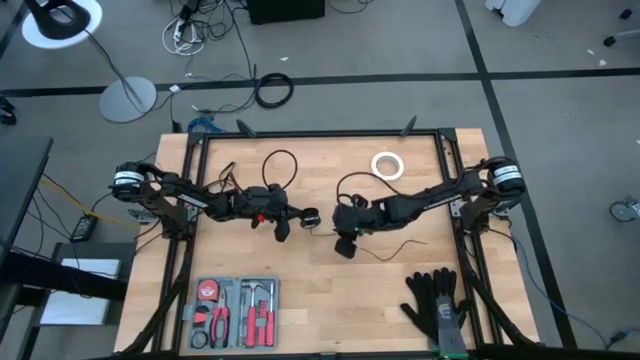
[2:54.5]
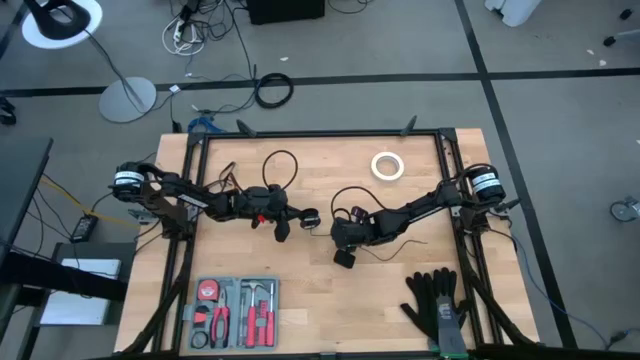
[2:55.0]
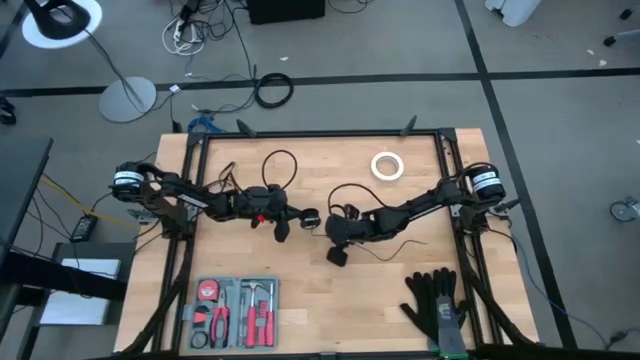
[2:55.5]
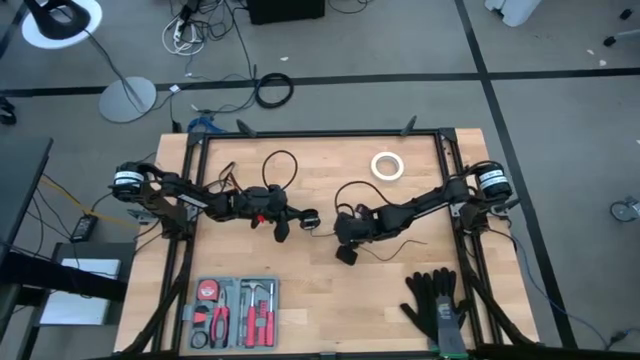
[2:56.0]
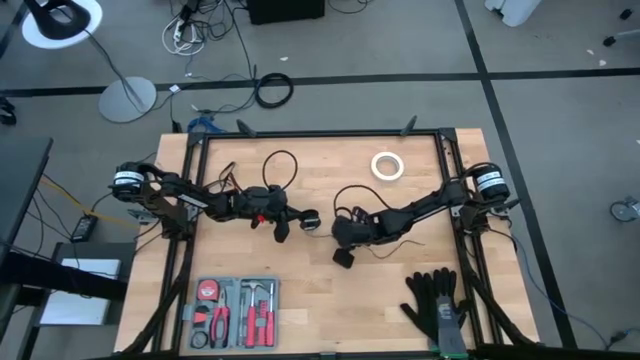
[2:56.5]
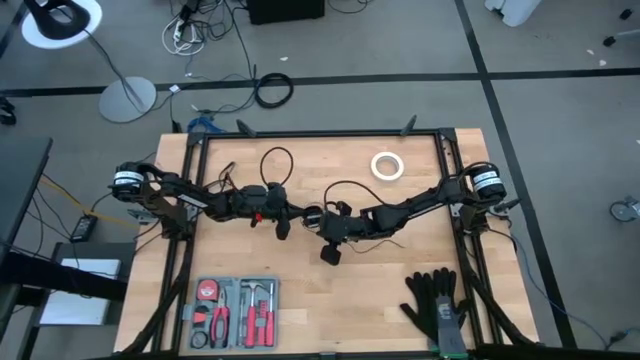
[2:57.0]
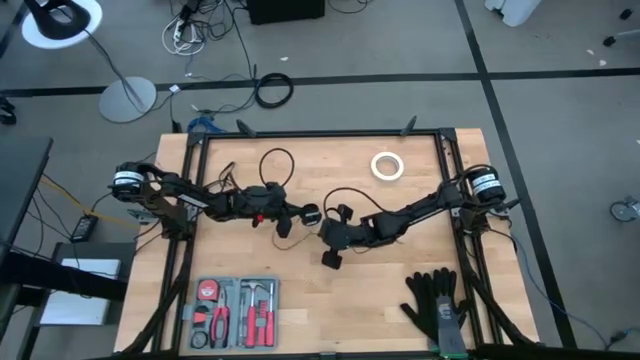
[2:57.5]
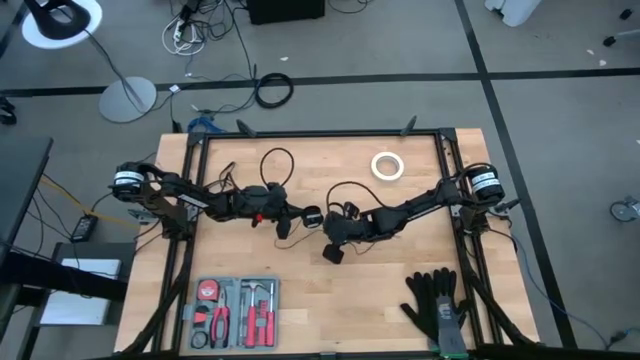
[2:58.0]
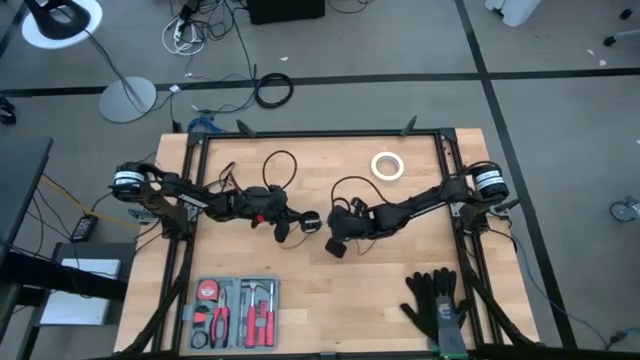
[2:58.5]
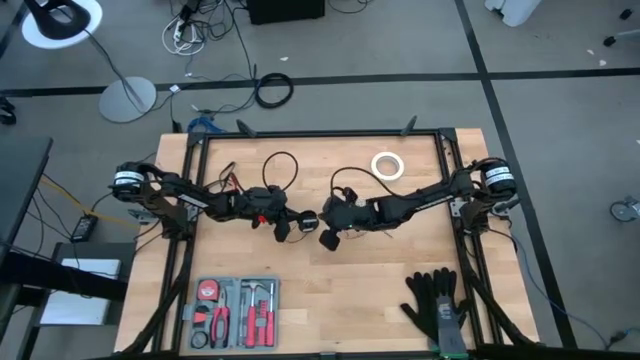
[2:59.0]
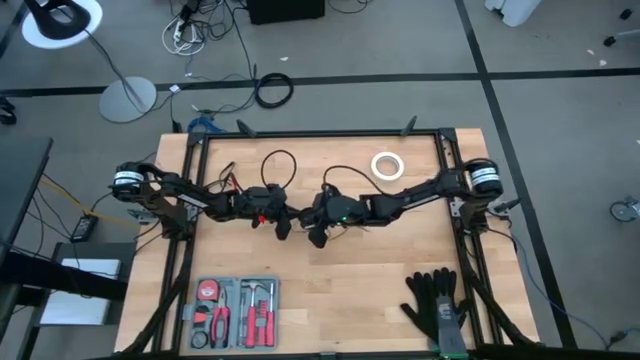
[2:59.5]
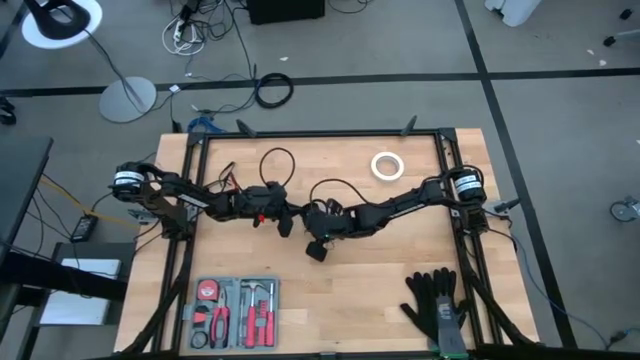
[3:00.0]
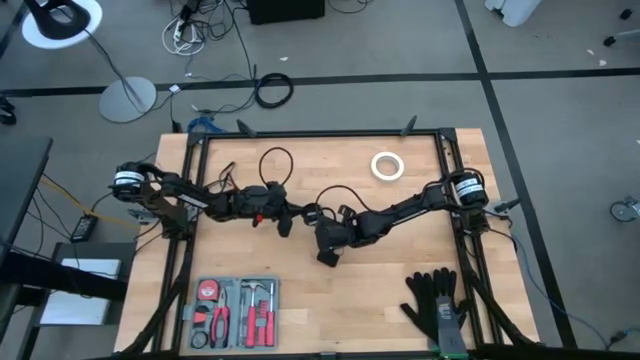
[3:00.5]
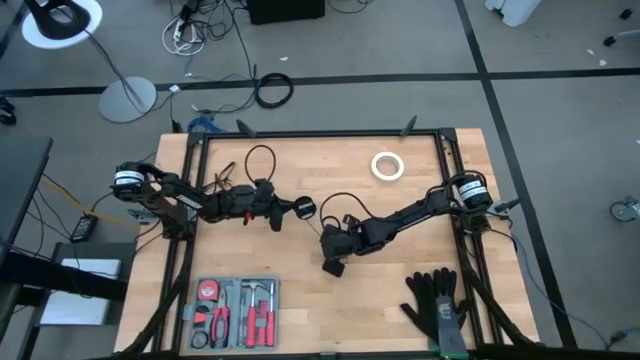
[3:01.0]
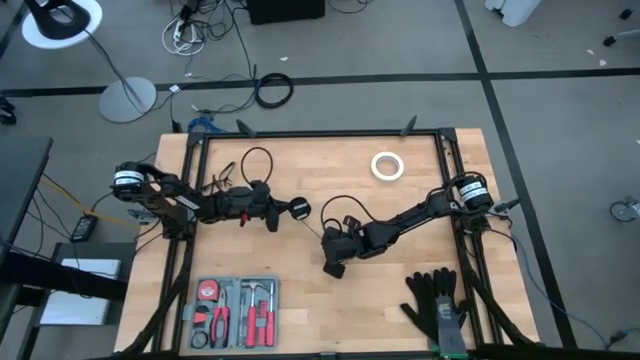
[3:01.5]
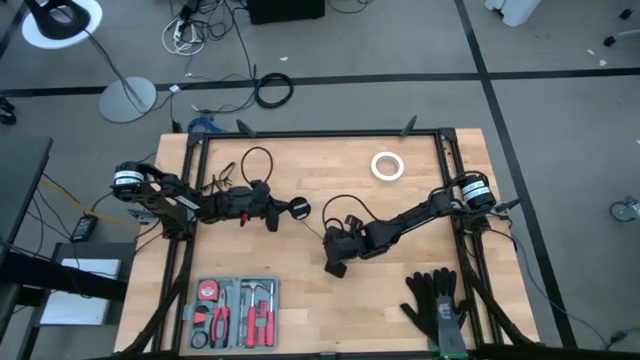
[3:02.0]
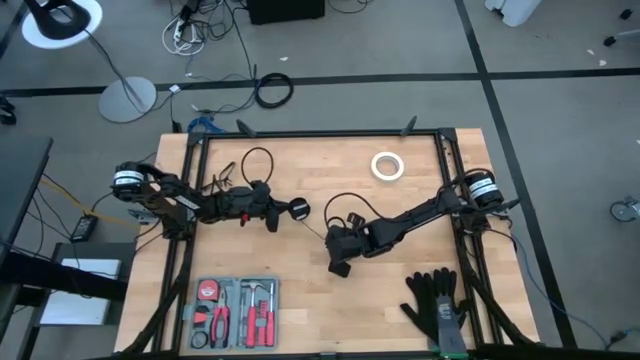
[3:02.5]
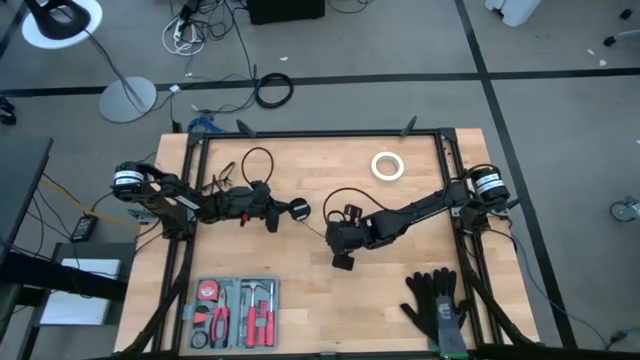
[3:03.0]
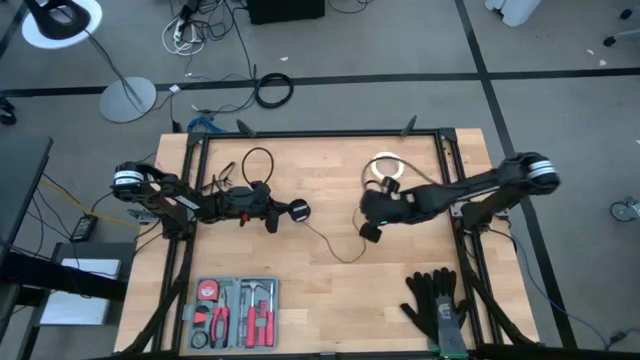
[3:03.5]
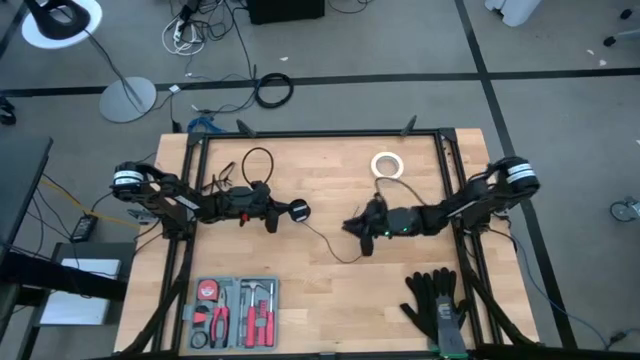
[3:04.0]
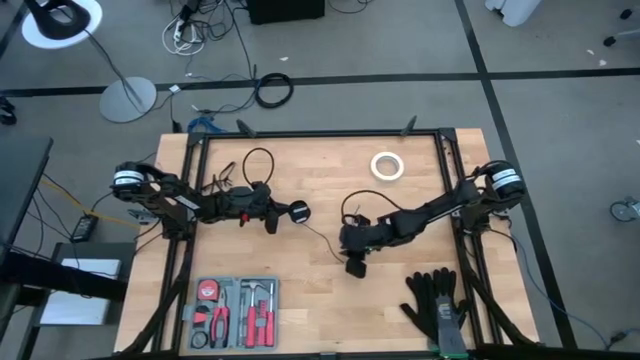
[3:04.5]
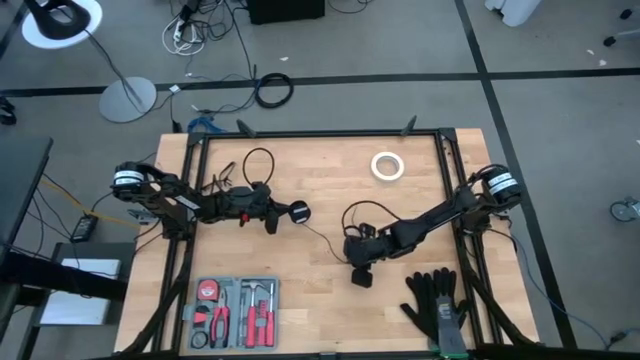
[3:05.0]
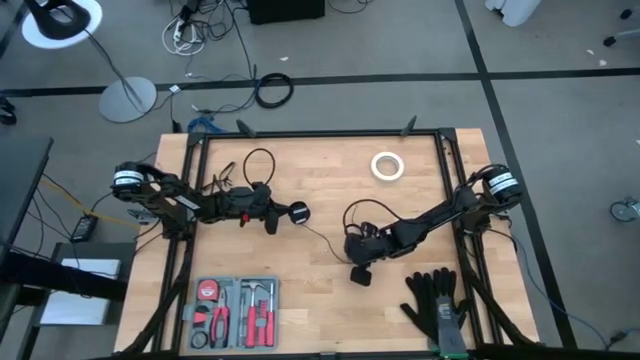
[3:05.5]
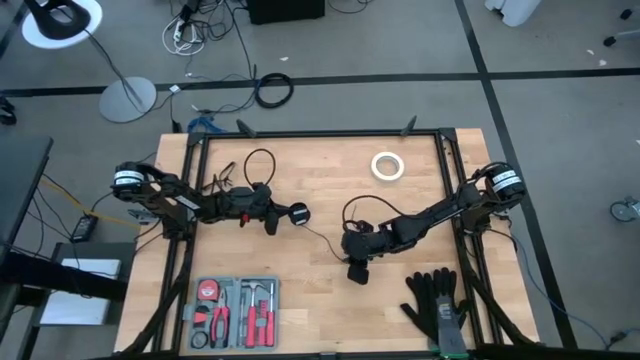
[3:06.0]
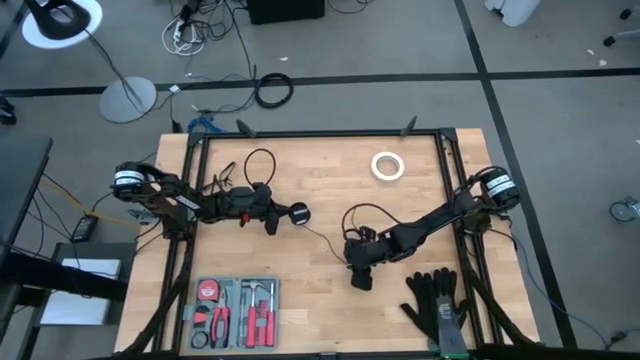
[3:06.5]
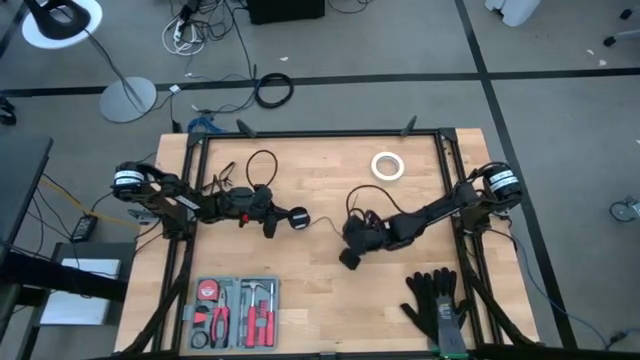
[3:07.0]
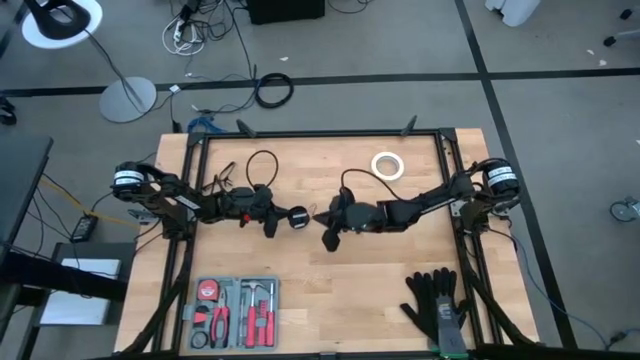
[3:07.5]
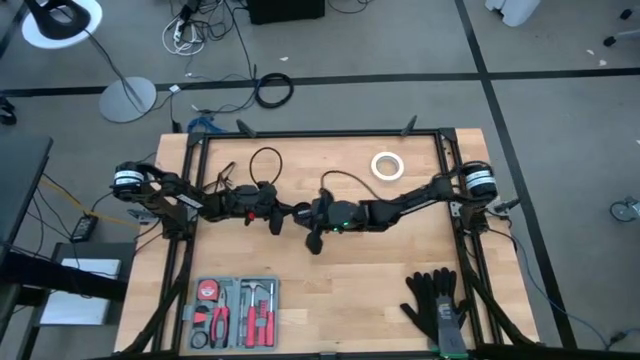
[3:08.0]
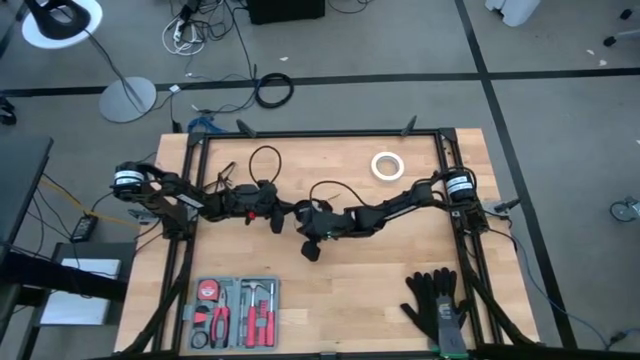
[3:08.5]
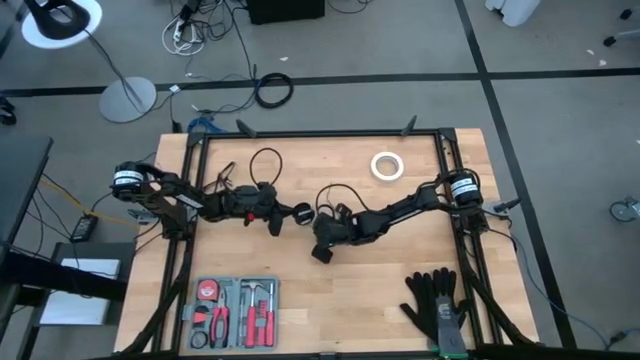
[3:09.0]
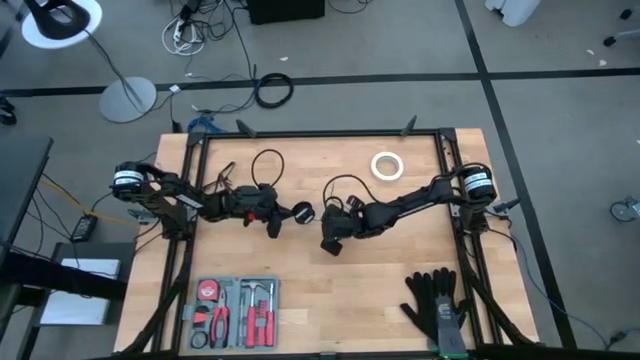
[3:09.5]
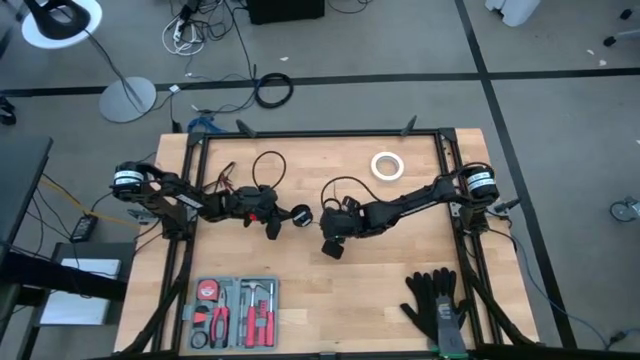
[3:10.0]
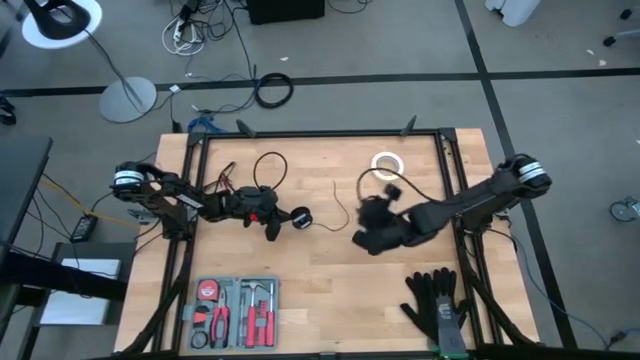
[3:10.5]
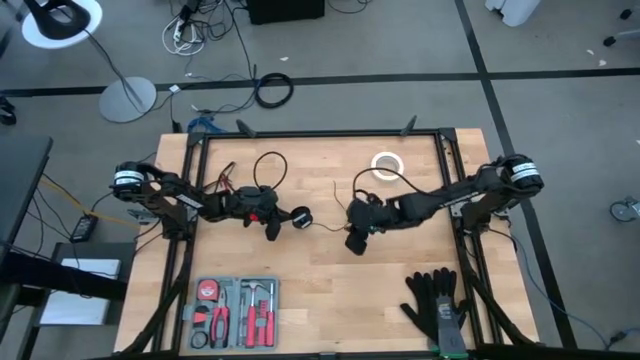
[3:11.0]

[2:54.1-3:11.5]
Task: Coil cords
Coil the black wire on the black spool

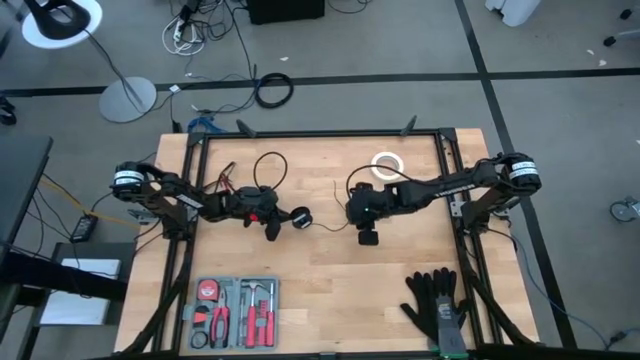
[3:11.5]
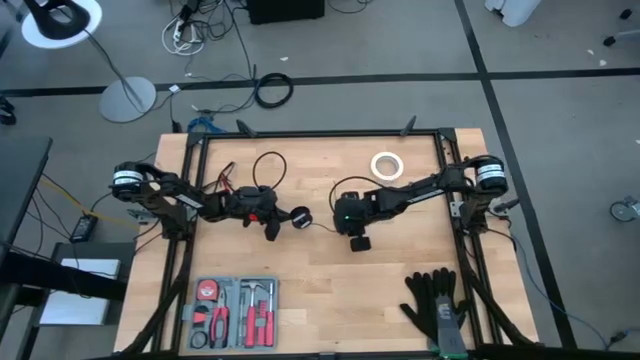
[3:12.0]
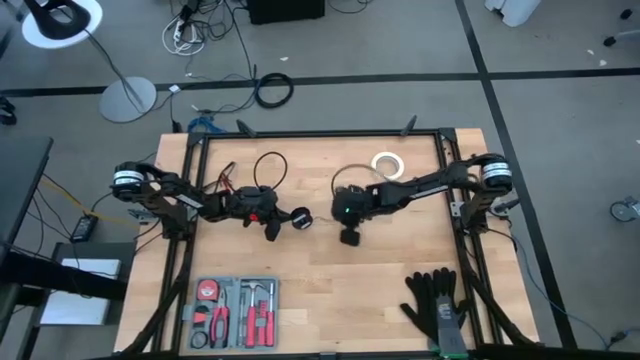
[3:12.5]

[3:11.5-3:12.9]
Coil the black wire on the black spool

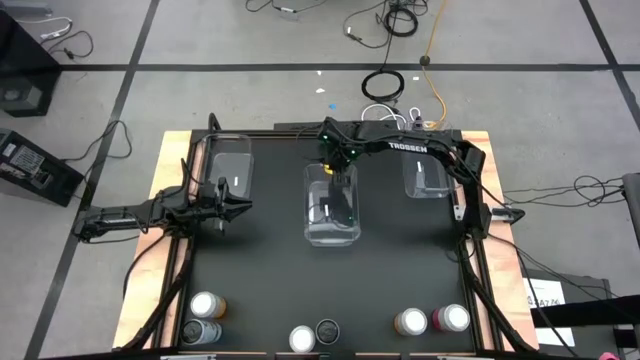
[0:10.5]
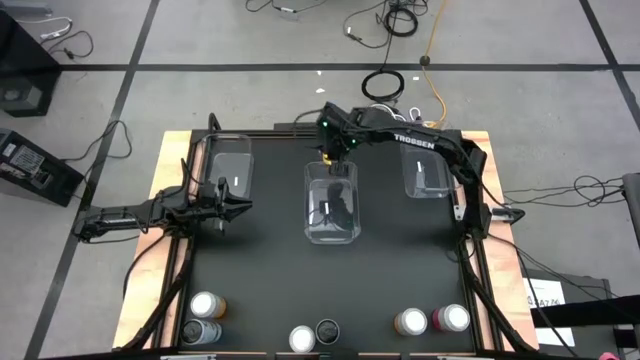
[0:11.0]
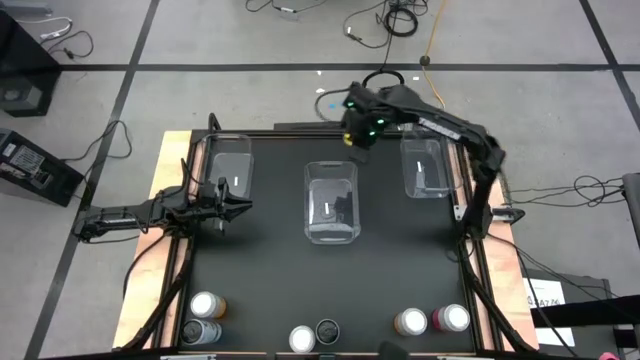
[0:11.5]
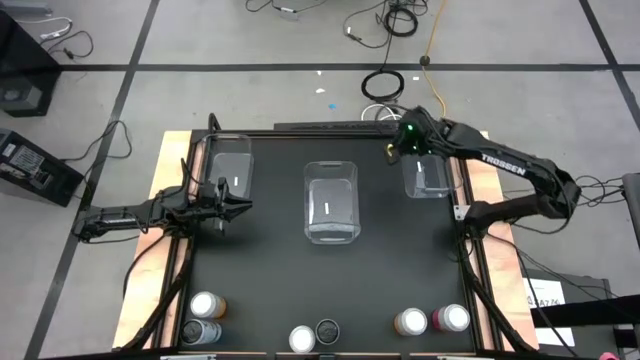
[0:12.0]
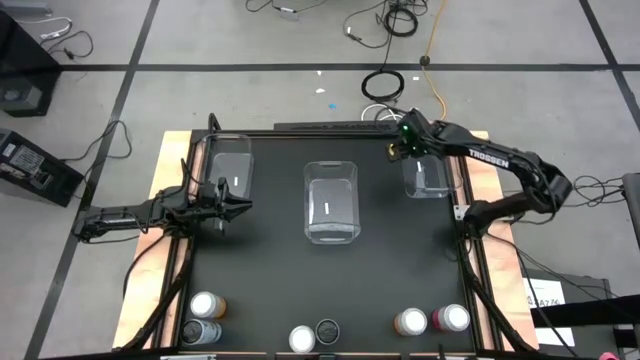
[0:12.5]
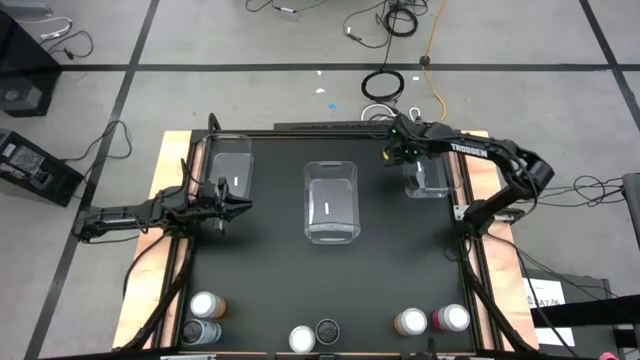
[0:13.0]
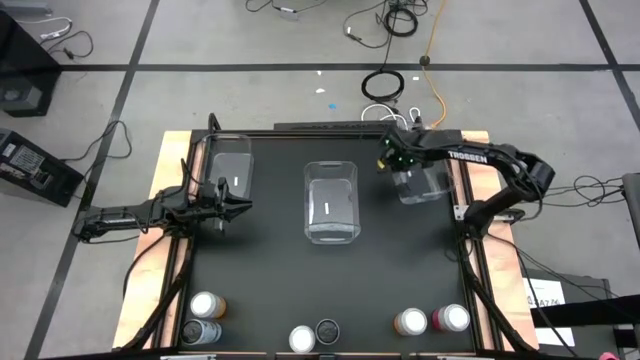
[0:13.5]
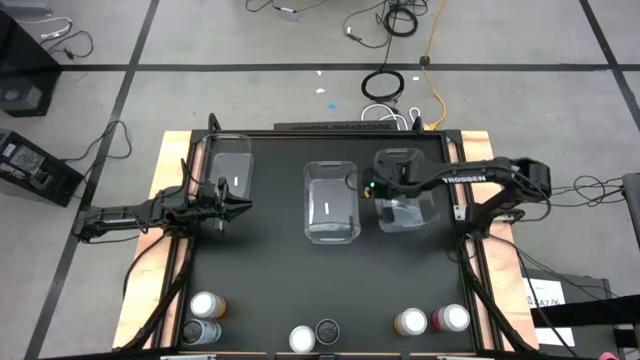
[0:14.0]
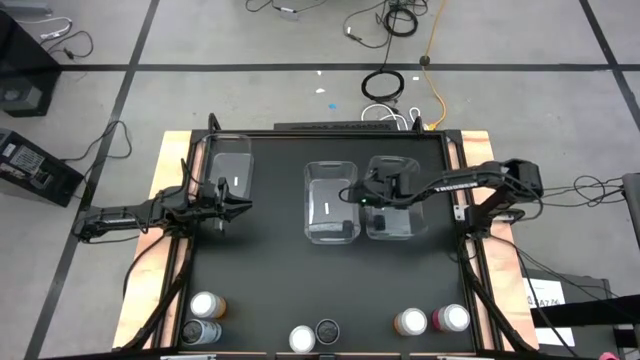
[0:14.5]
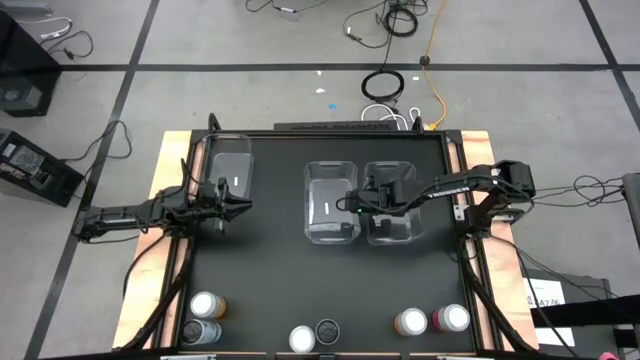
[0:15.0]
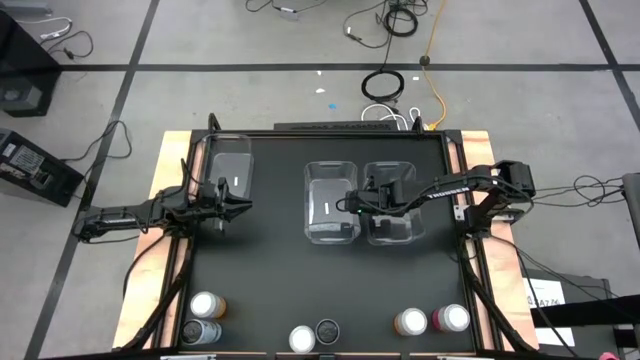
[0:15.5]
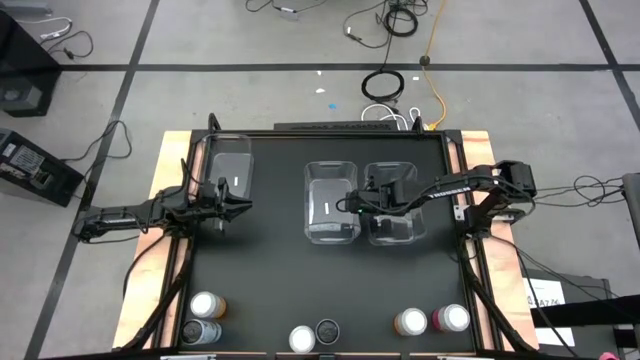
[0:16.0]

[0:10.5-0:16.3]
Task: Sort soda cans
Move the right transparent bin to the middle right of the table
